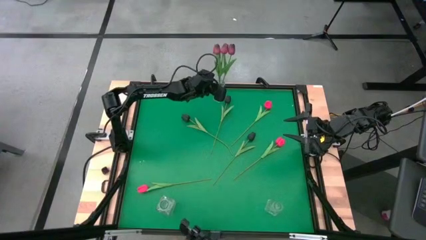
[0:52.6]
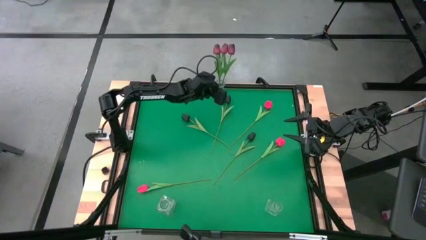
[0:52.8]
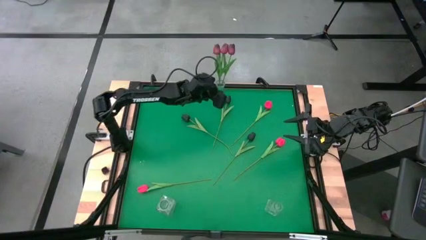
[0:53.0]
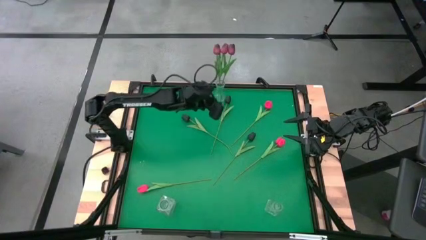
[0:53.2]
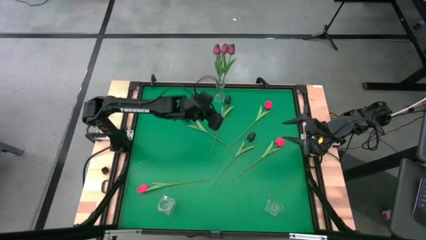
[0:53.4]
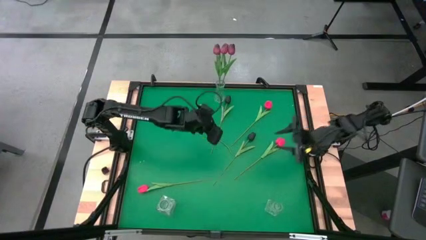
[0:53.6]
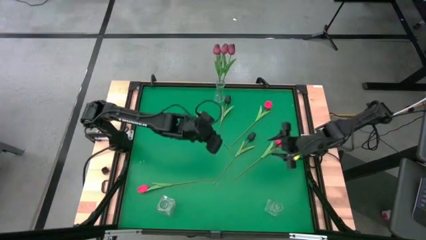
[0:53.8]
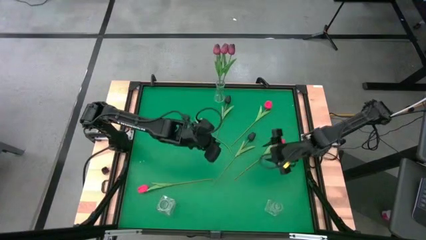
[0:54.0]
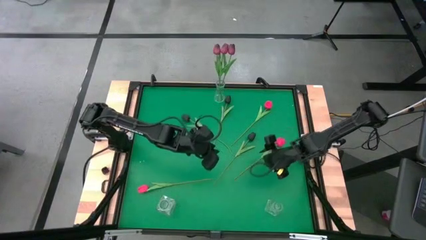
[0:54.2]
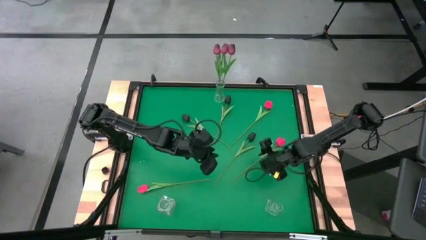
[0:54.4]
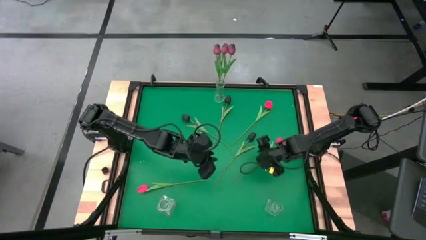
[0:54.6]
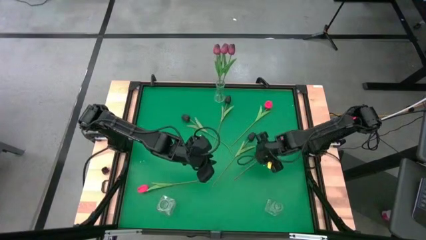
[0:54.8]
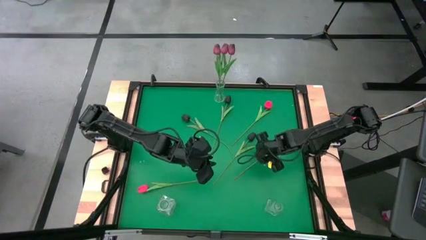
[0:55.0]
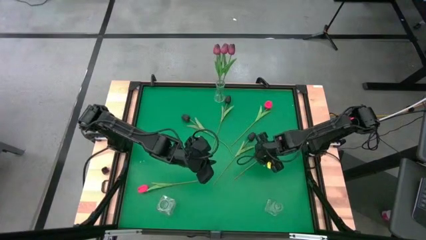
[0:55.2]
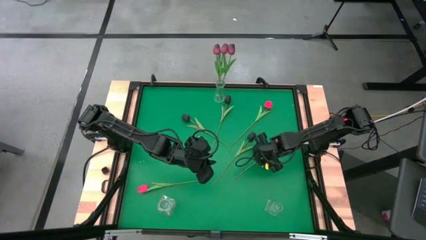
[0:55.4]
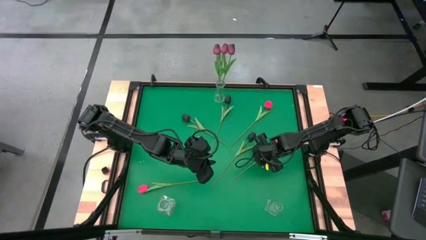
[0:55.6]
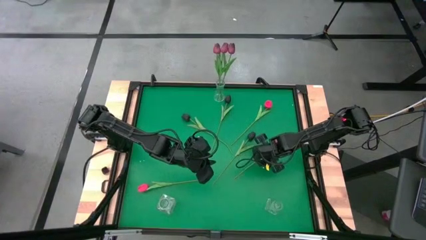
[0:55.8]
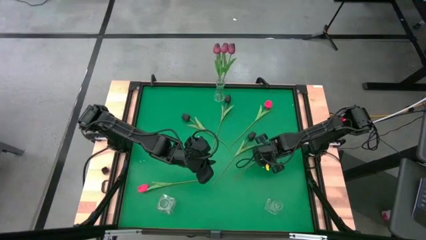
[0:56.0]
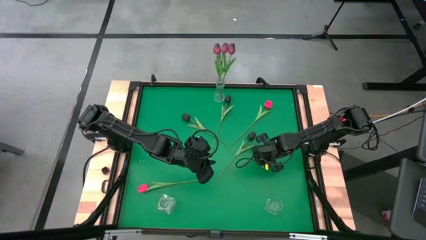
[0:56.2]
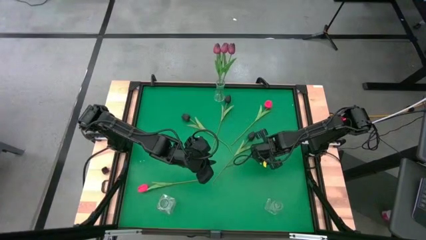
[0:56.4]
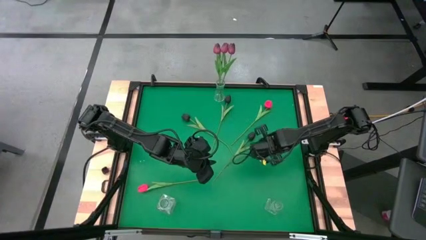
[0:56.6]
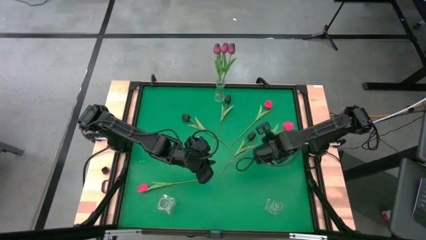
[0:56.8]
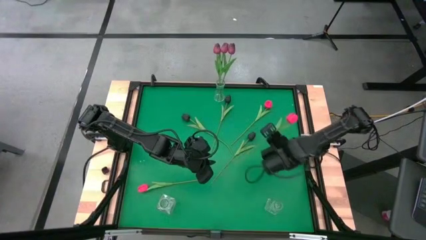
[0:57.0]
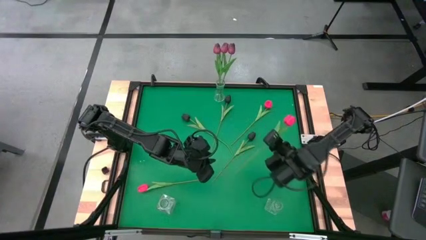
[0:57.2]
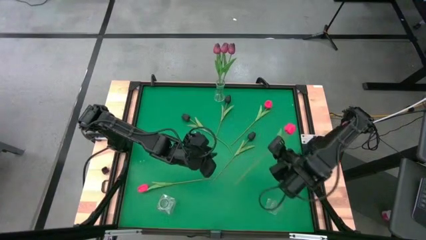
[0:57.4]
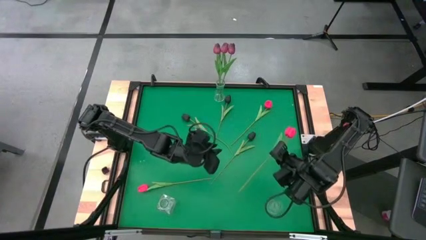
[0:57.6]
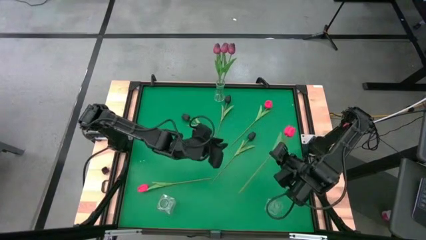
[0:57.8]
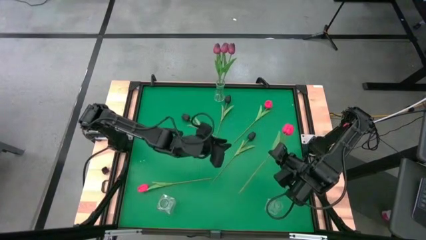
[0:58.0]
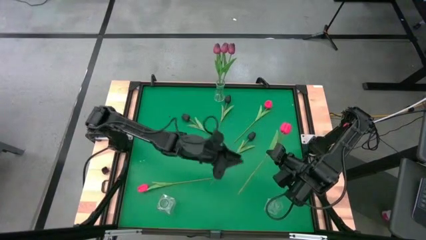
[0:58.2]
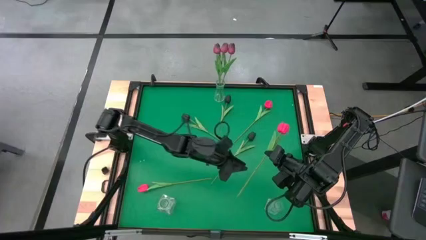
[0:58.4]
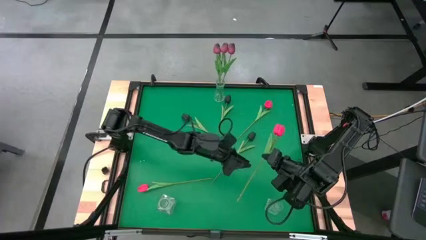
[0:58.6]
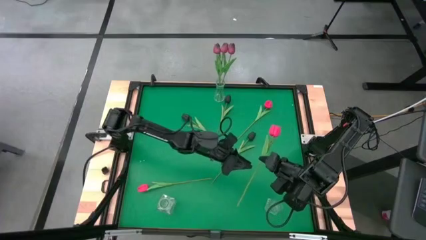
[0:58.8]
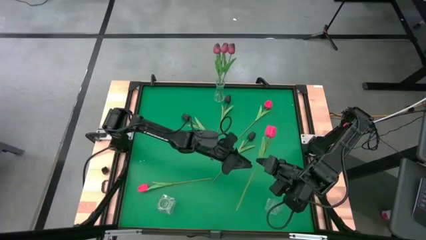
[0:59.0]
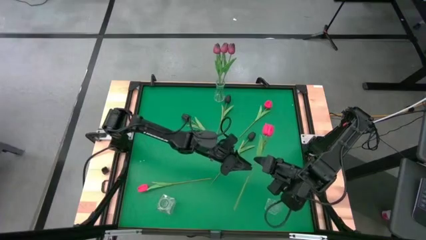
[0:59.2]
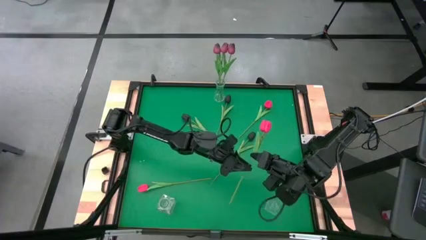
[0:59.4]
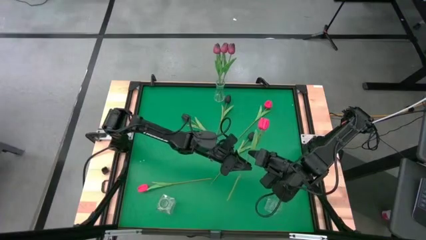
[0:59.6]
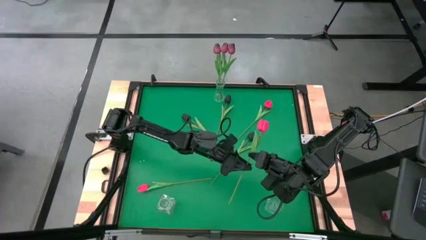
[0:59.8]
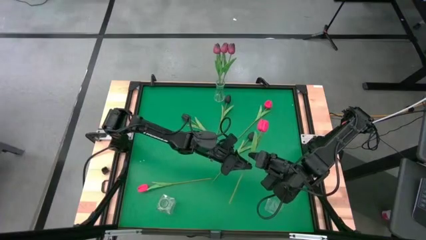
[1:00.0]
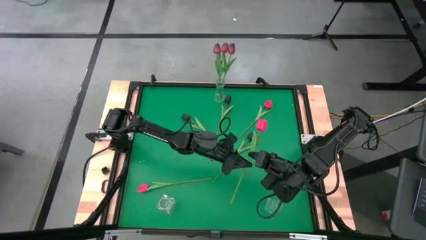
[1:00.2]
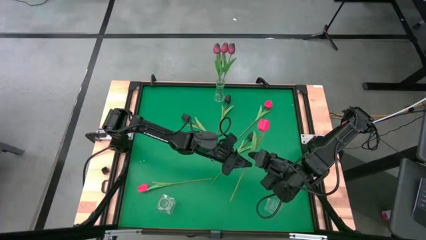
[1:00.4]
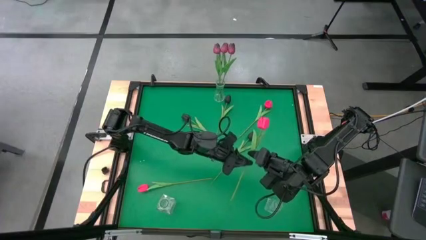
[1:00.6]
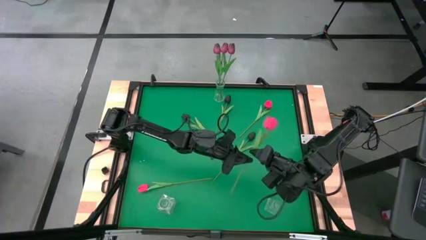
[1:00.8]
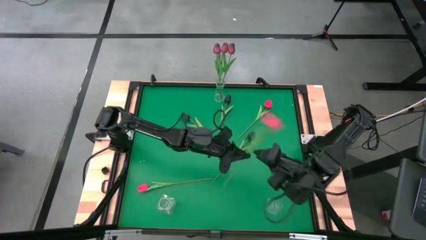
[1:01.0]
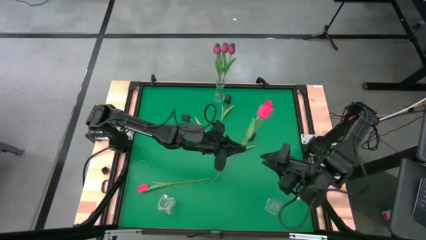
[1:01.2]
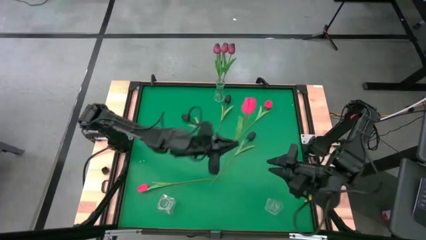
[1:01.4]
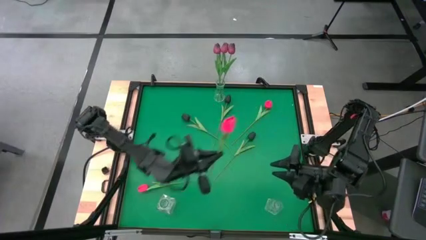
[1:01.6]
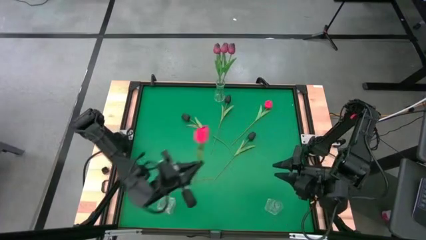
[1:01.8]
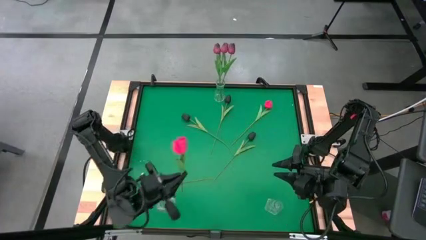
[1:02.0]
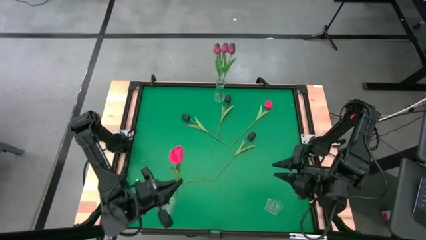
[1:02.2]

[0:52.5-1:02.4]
Task: Sort flowers into vase by color
Put the middle red tulip into the bottom left transparent vase

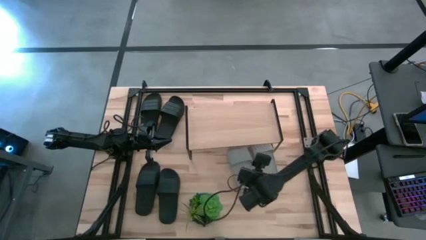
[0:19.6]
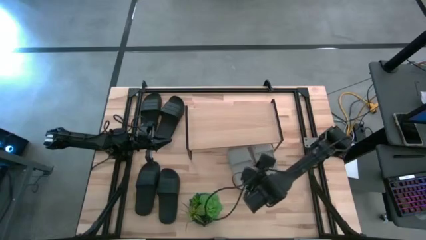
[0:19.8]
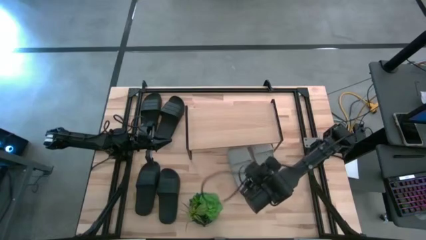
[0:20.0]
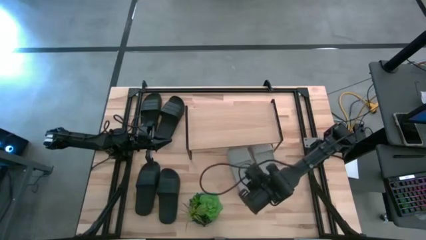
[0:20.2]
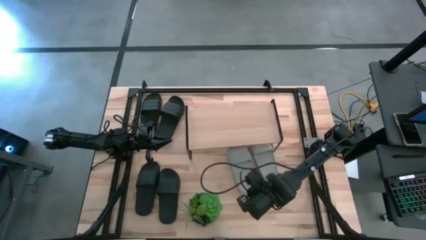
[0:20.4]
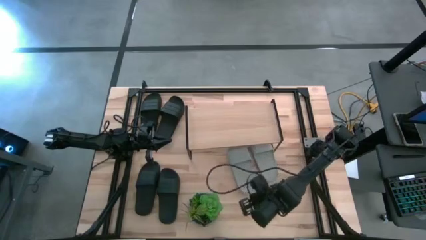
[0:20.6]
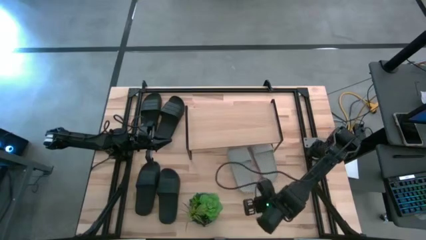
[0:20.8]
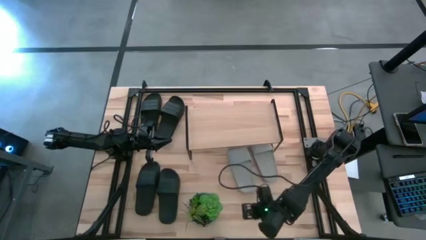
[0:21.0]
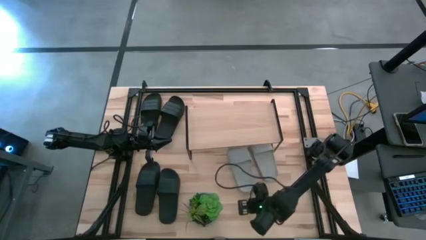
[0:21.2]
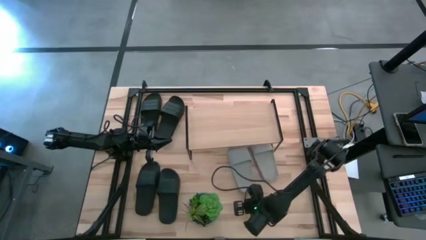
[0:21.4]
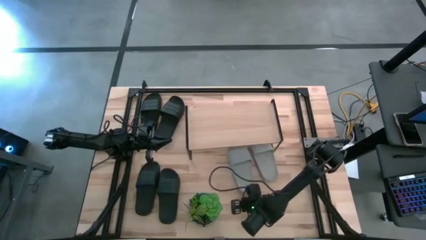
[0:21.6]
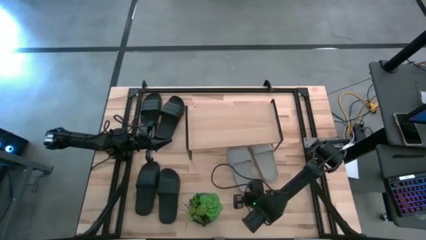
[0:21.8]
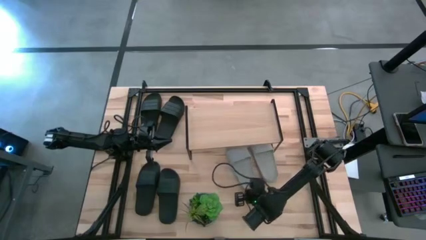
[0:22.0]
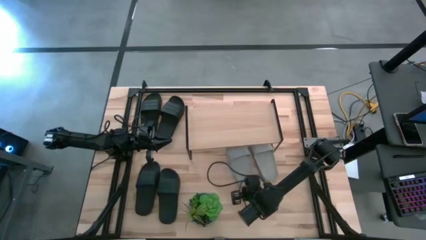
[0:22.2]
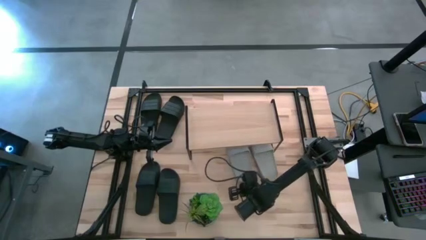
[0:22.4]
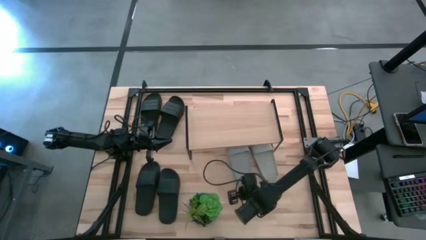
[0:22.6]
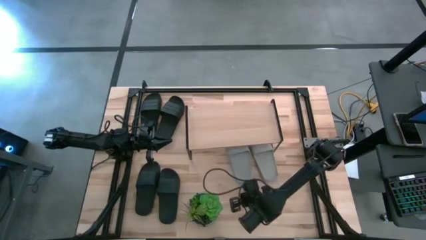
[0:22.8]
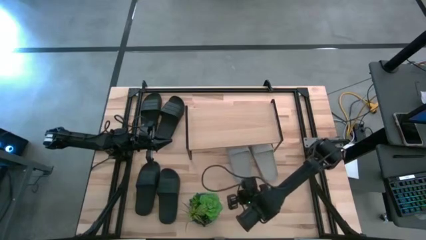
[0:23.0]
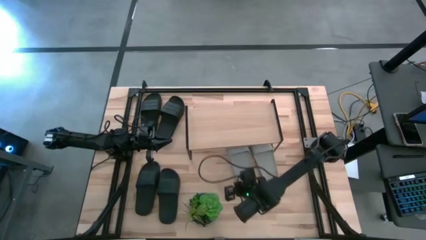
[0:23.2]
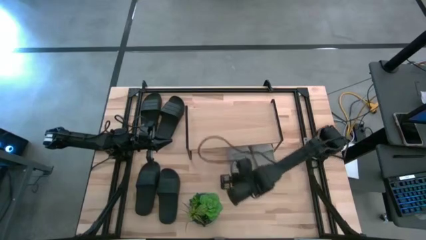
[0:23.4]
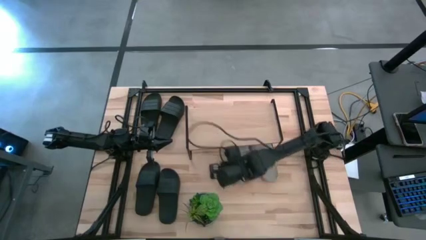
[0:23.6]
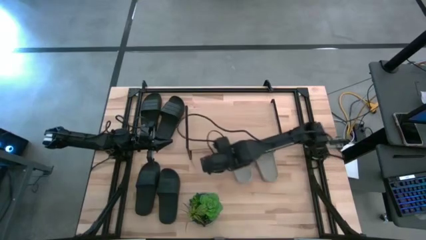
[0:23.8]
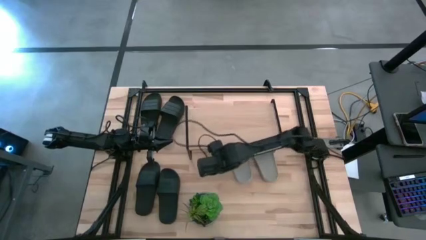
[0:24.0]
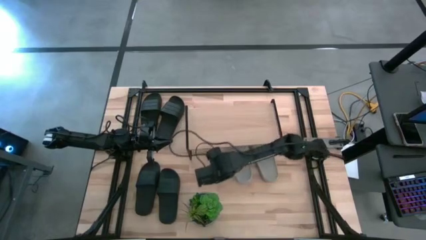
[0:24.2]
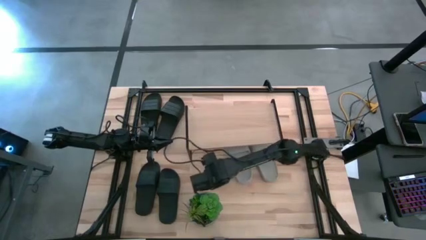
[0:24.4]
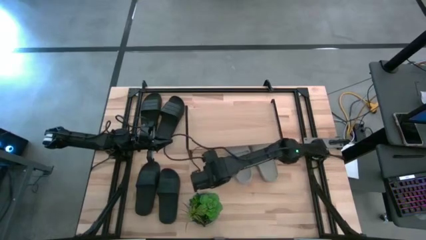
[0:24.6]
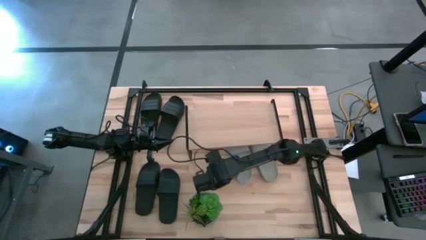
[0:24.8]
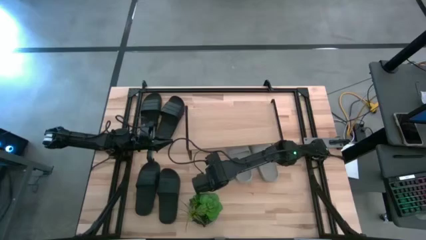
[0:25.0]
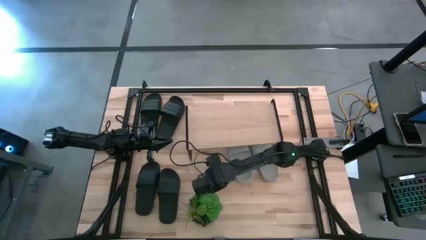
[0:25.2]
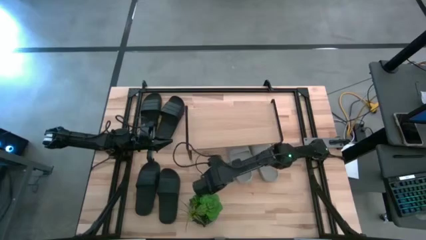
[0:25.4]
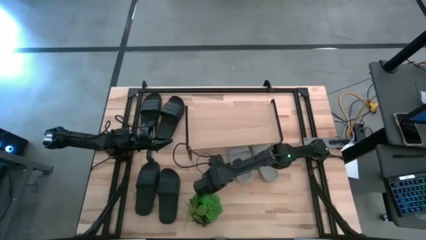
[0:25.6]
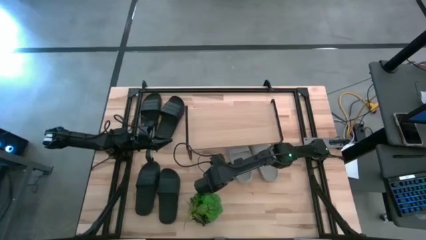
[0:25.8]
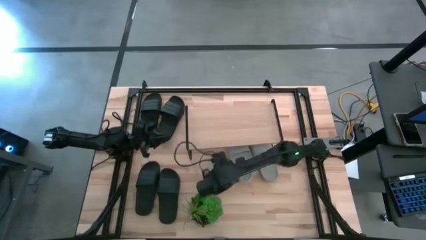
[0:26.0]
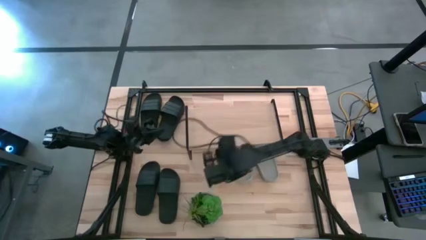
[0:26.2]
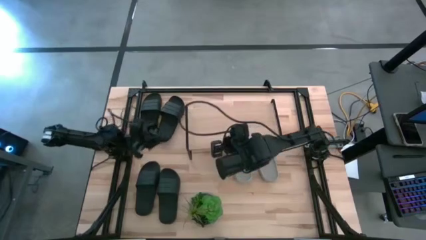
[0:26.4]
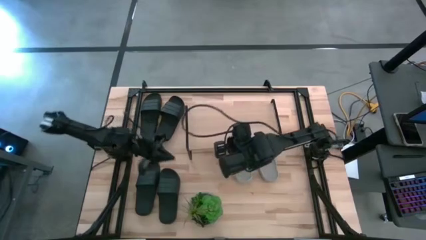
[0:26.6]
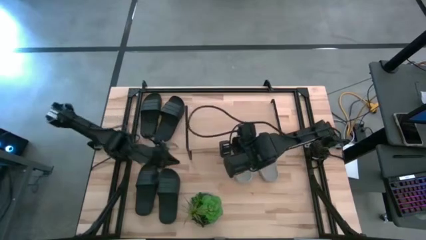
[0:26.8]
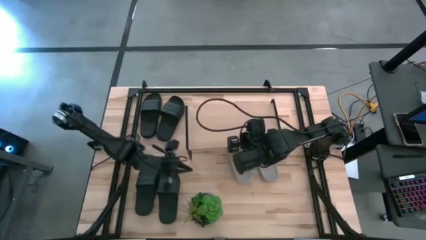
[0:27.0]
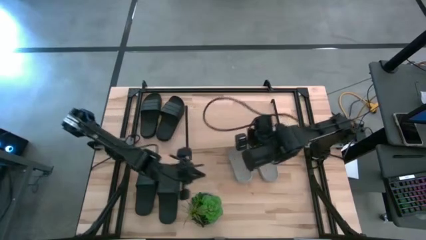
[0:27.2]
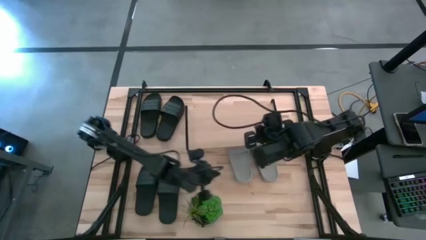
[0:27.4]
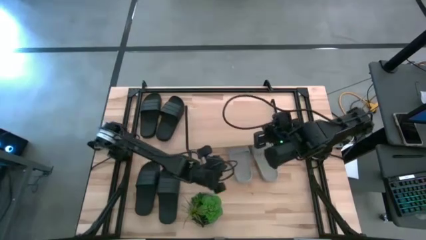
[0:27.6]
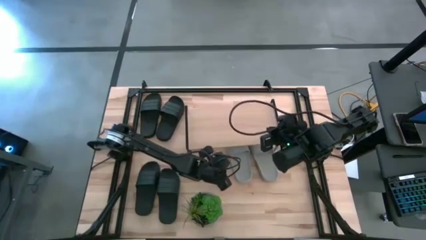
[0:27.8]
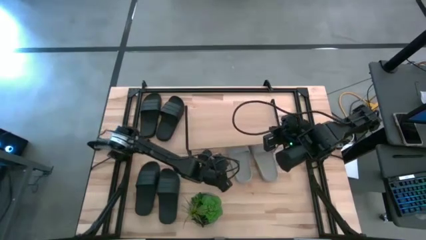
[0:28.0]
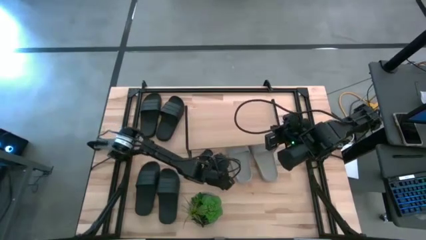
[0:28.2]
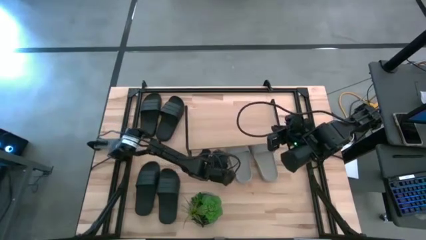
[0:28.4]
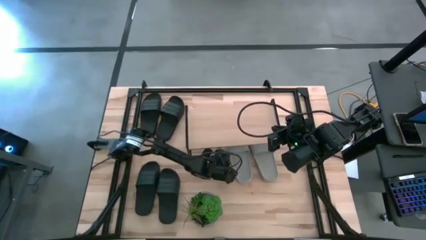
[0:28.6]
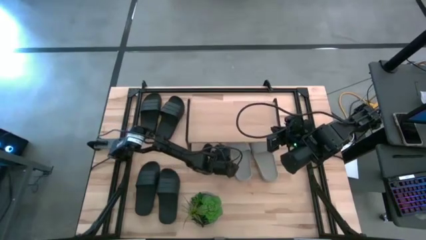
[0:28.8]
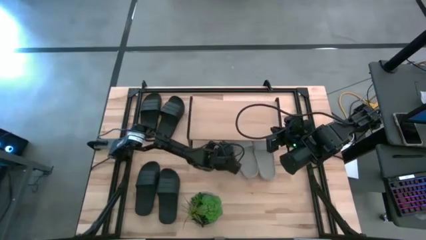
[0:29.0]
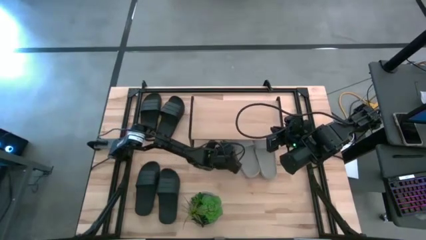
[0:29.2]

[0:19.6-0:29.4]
Task: Pick and place slides into the shelf
Put the gray slide under the shelf
